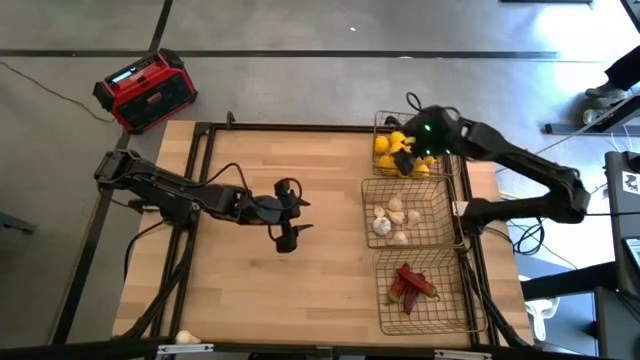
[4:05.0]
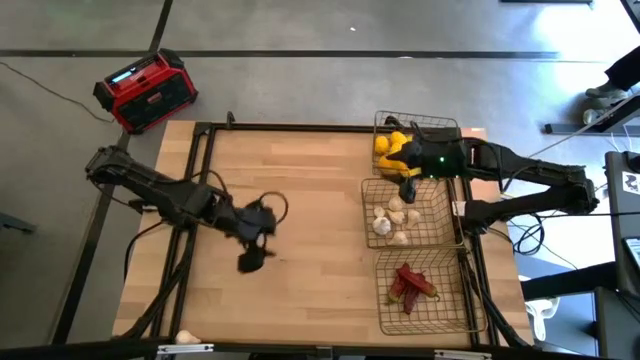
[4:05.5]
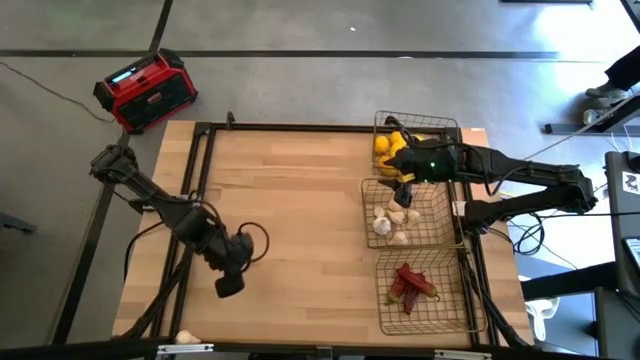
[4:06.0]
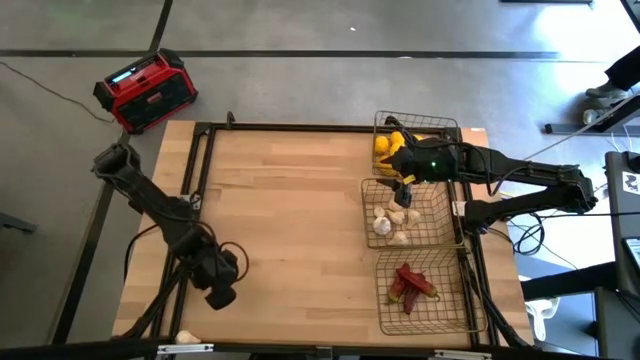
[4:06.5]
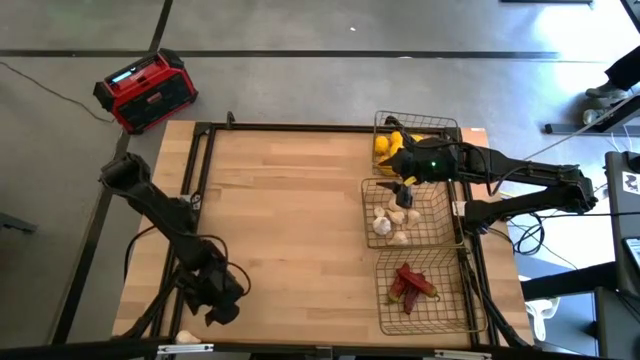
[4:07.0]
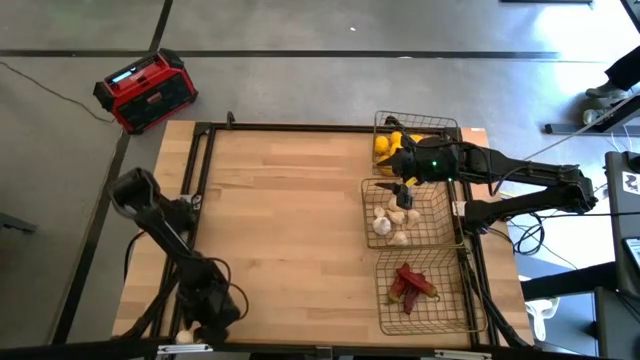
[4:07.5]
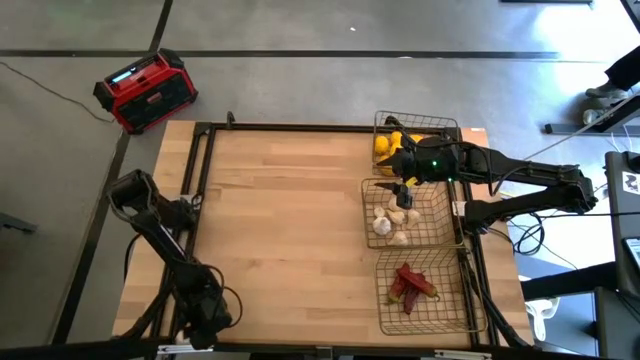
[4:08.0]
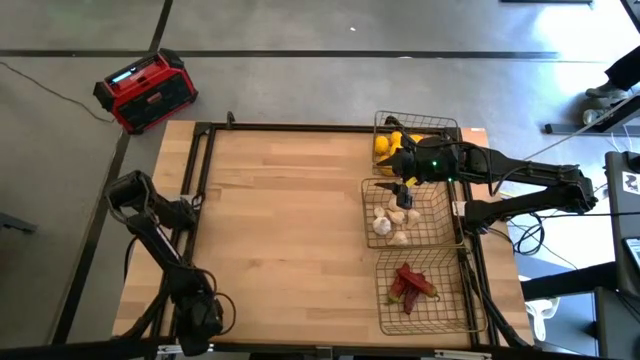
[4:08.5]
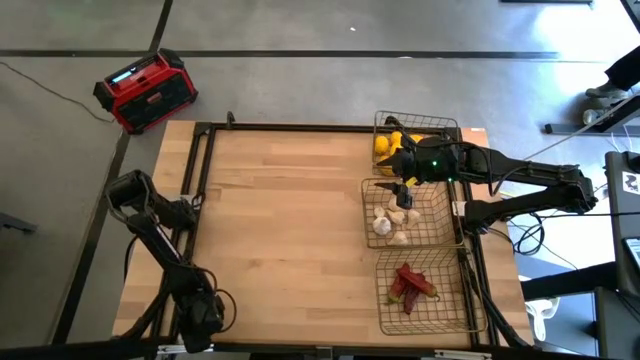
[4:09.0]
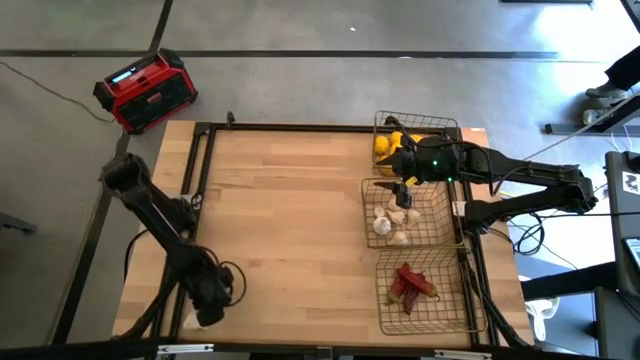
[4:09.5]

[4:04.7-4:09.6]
Task: Sort produce into baskets
Put the white garlic into the middle wire basket

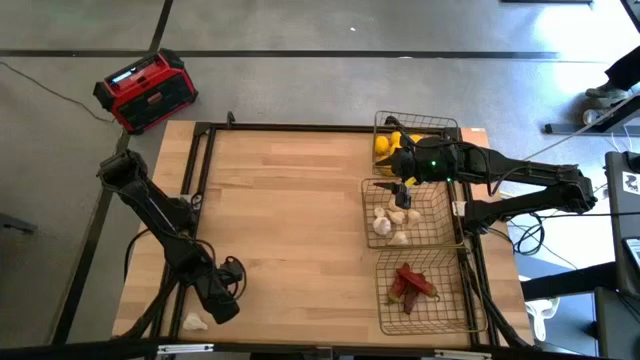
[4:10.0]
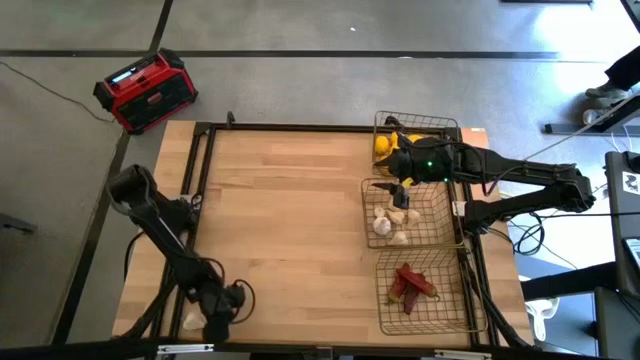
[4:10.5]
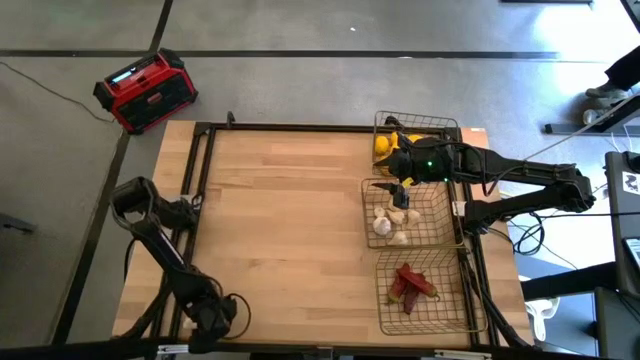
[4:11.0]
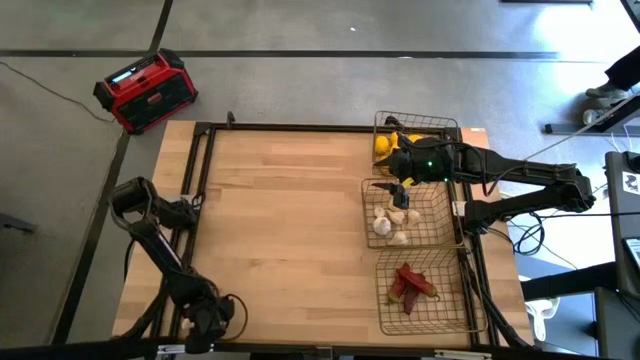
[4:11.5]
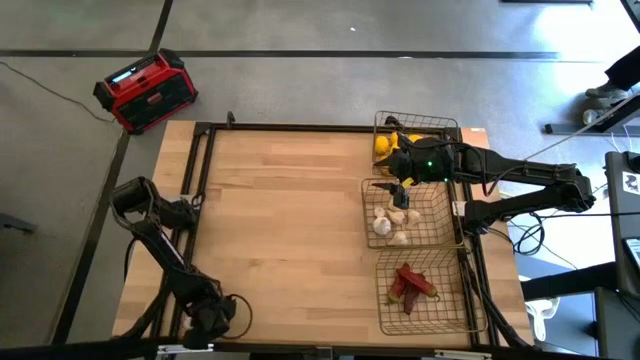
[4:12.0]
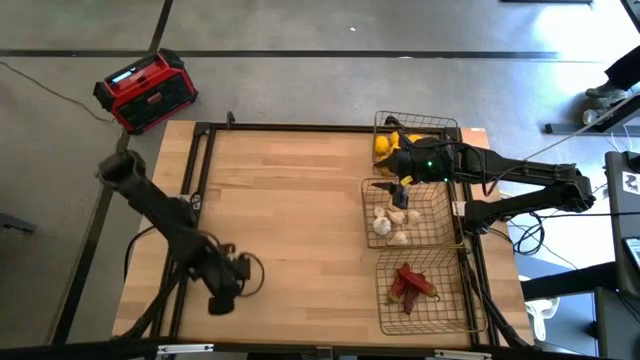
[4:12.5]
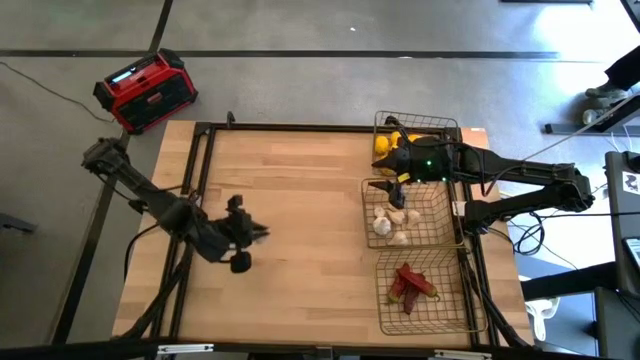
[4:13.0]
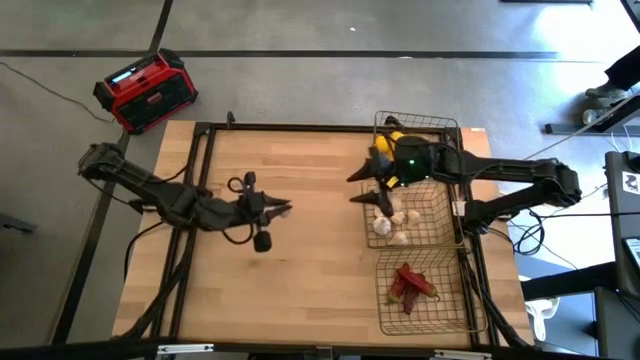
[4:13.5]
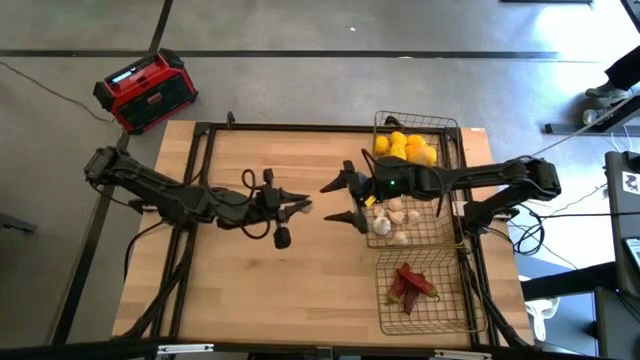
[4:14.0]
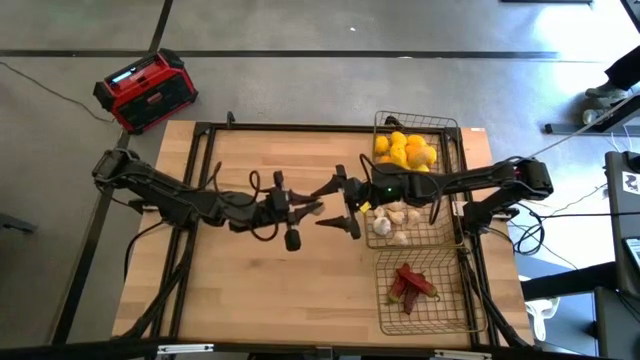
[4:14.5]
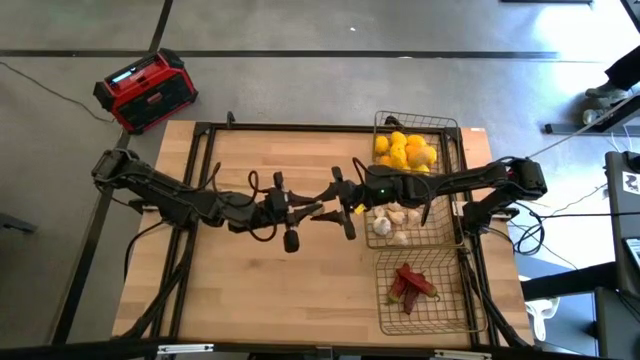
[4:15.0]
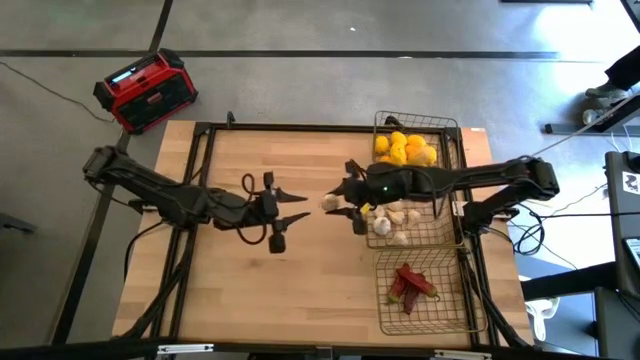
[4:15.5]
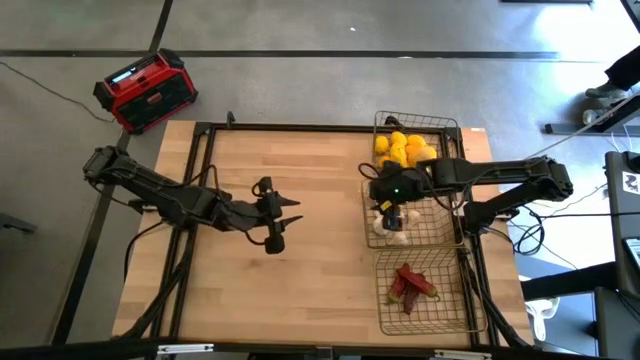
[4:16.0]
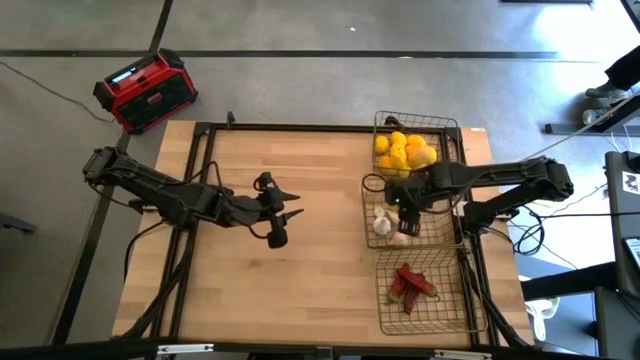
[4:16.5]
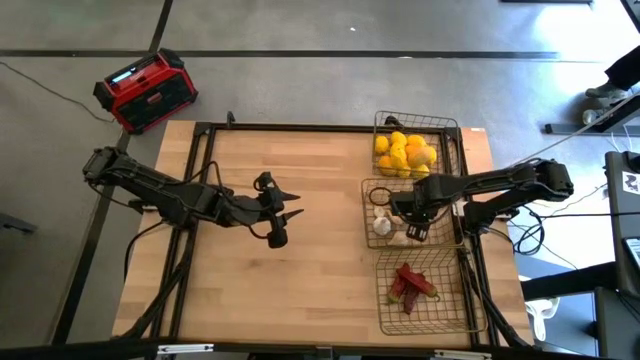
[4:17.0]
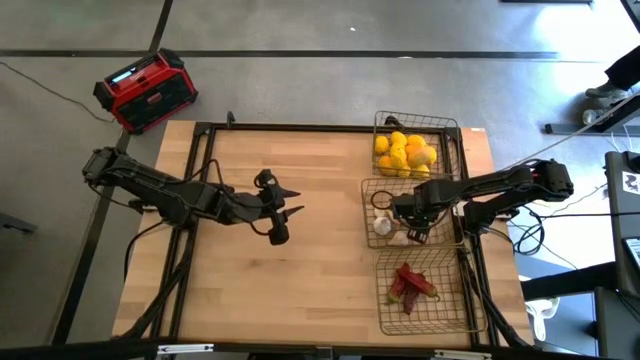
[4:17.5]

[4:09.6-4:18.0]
Put the white garlic into the middle wire basket

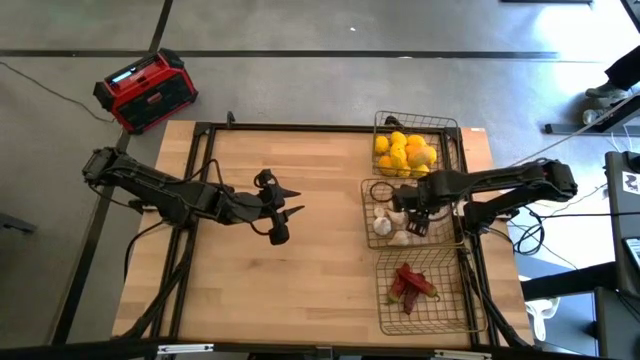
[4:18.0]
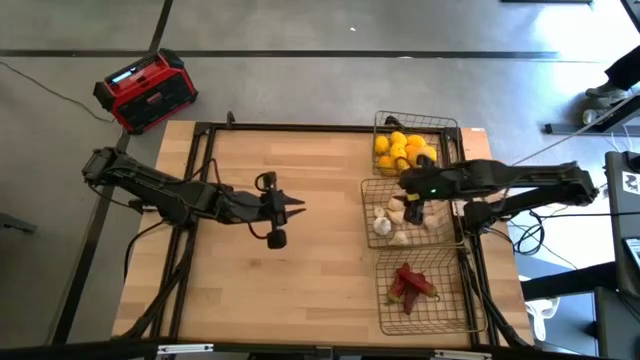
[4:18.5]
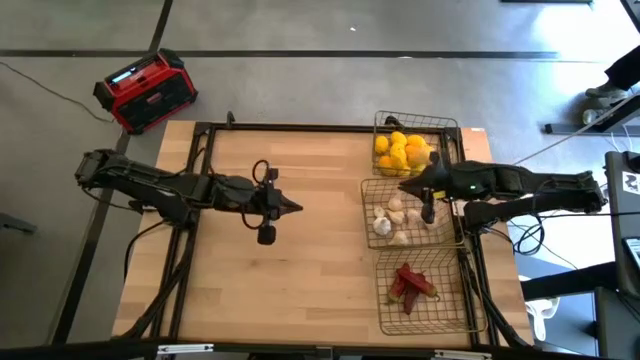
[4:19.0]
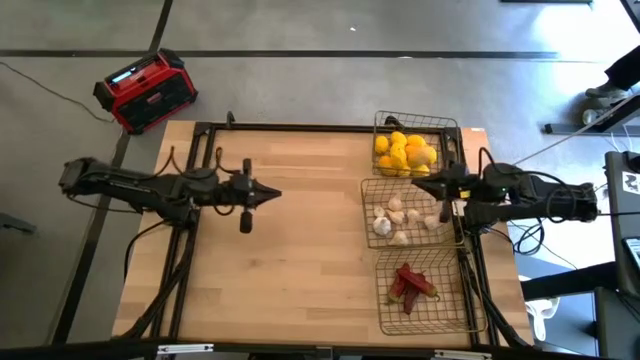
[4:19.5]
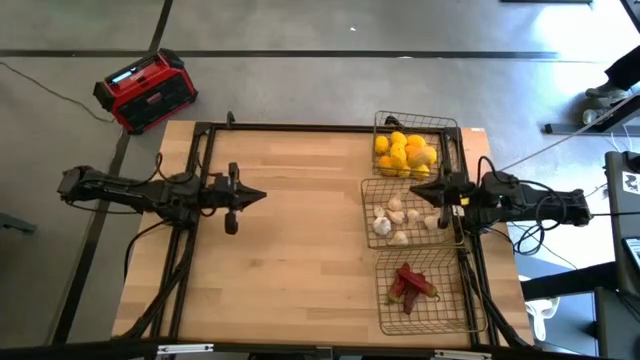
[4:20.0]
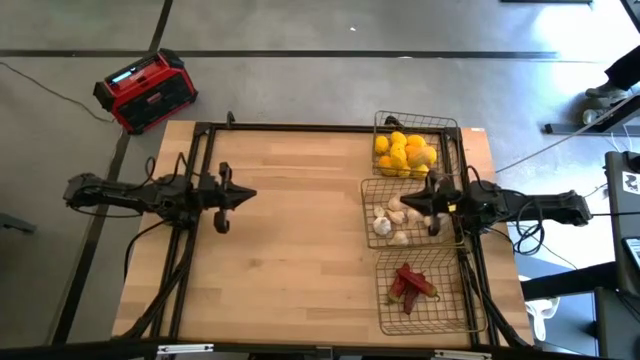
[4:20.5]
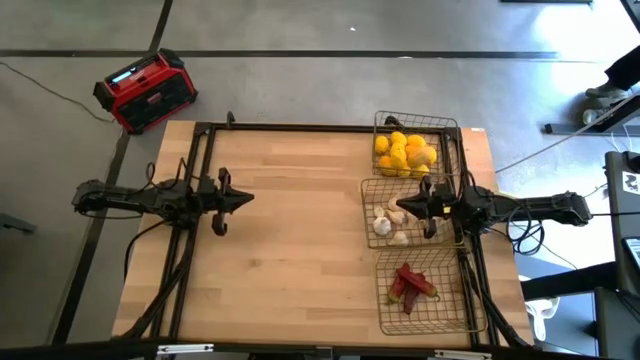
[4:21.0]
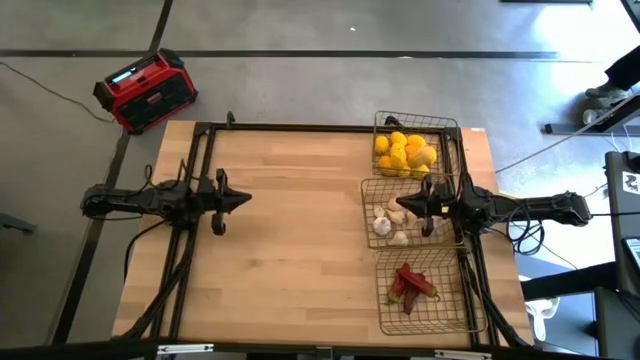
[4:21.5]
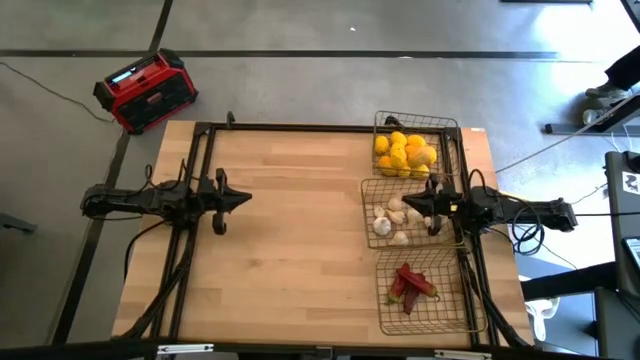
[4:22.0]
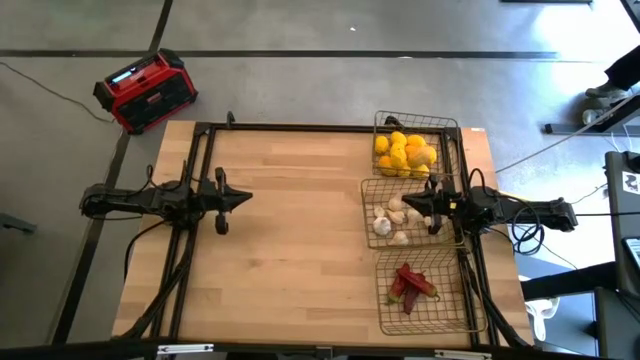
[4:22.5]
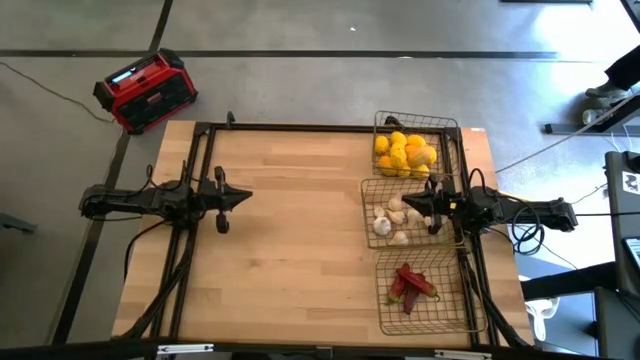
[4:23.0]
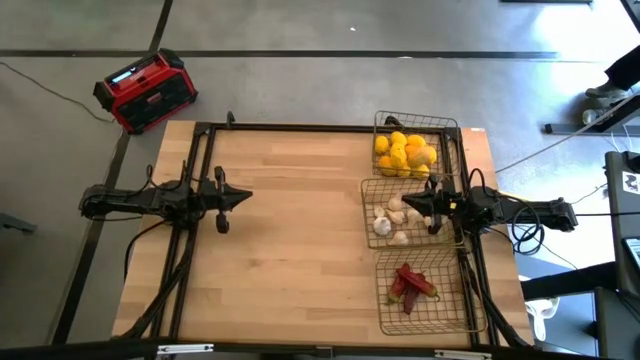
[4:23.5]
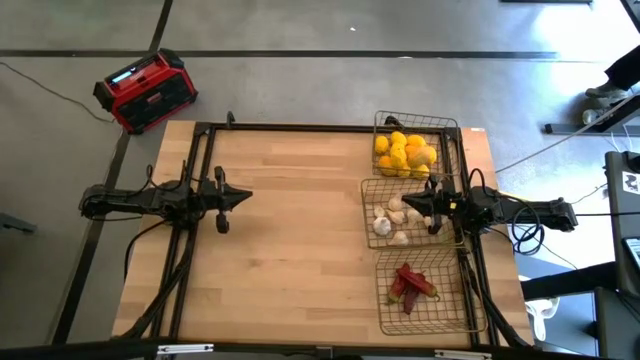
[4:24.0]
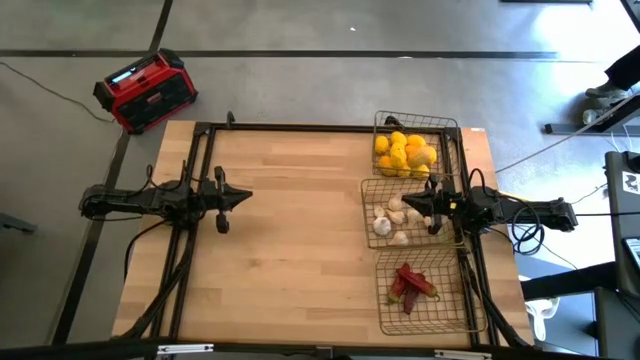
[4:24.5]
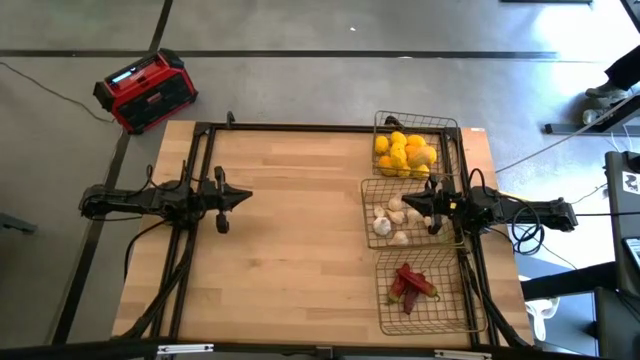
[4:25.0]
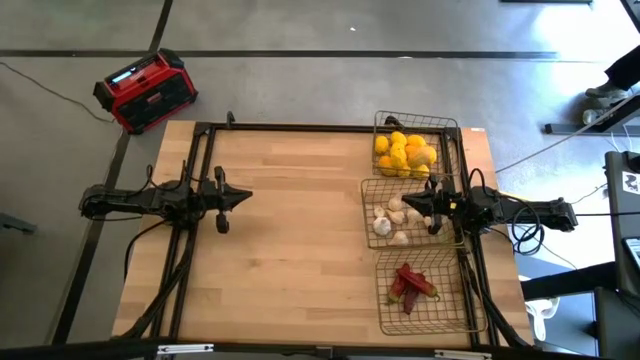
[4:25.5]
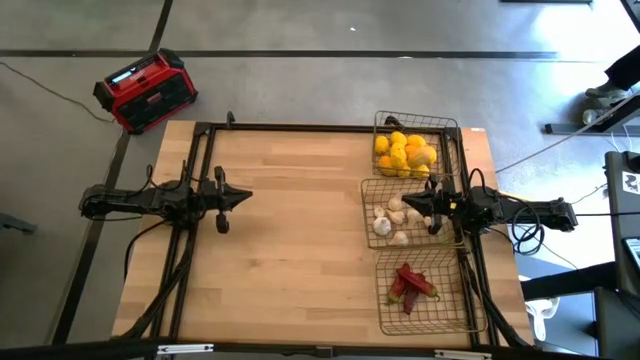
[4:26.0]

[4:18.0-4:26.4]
Return to Home Position

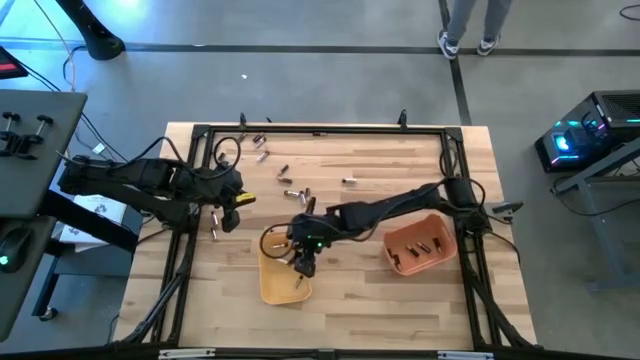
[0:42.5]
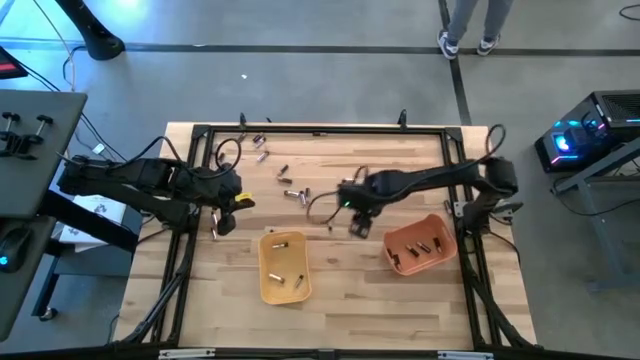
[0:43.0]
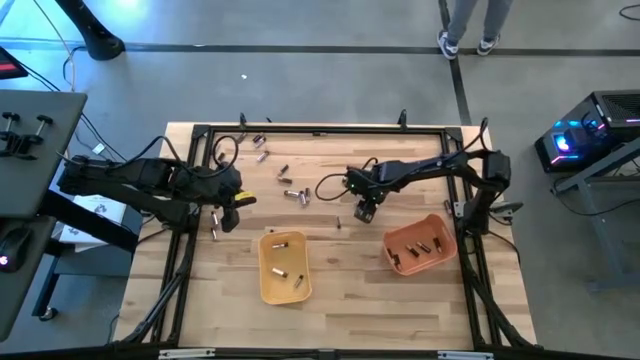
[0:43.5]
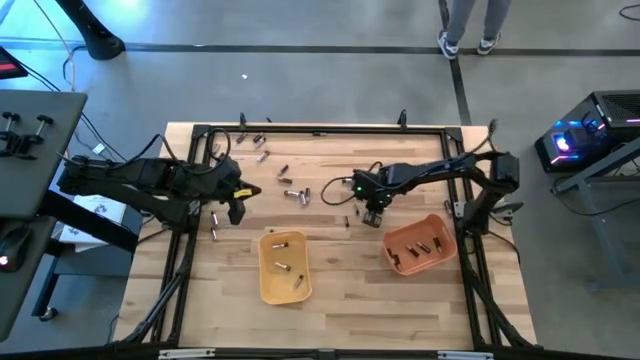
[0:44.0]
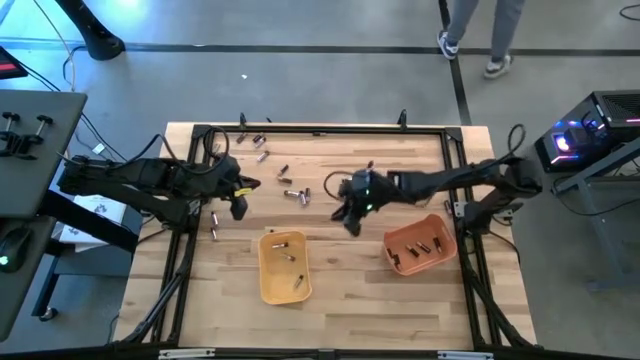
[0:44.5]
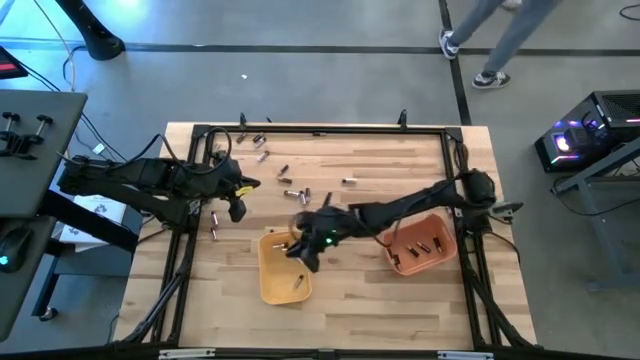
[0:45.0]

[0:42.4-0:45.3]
Task: Sort batteries
Put the silver battery into the yellow bin
